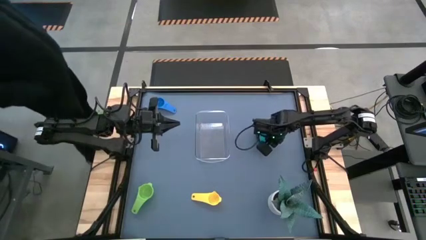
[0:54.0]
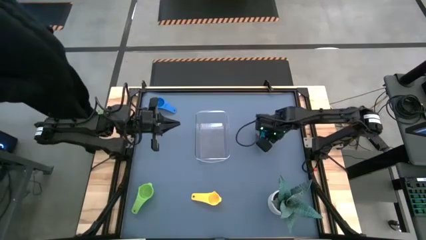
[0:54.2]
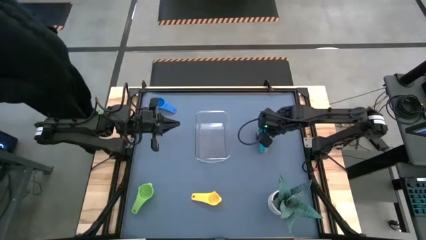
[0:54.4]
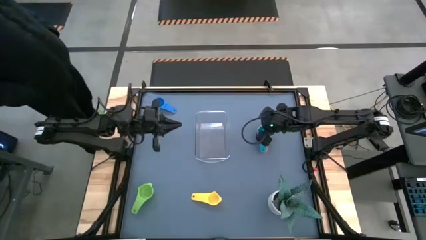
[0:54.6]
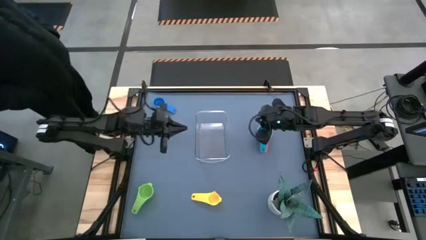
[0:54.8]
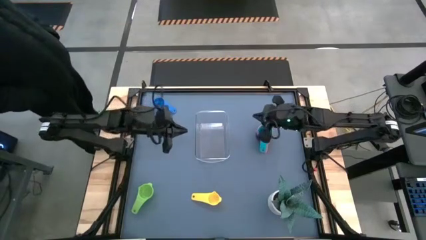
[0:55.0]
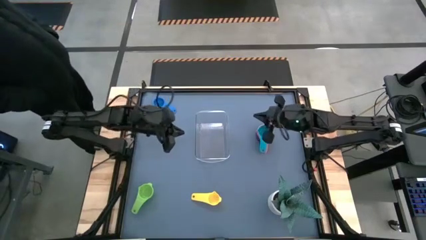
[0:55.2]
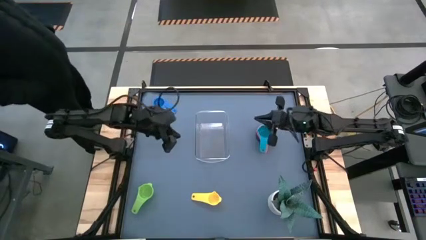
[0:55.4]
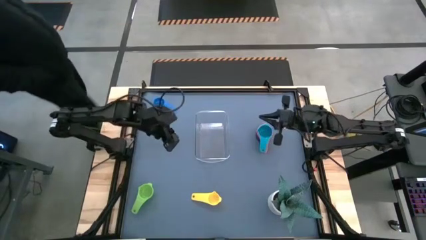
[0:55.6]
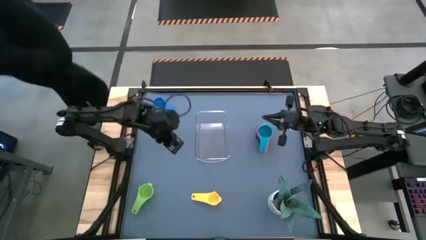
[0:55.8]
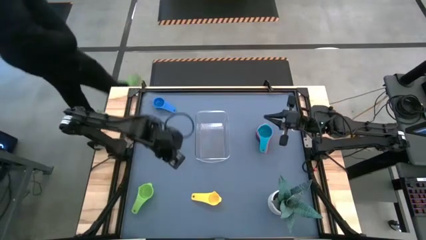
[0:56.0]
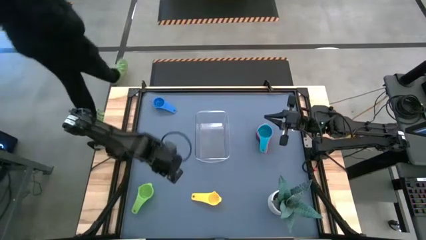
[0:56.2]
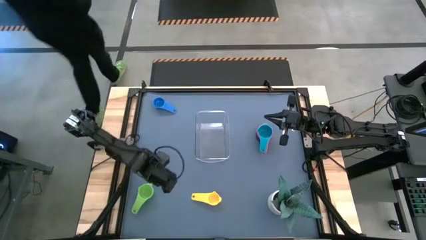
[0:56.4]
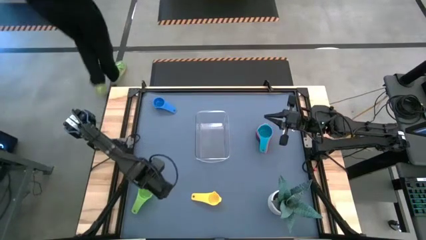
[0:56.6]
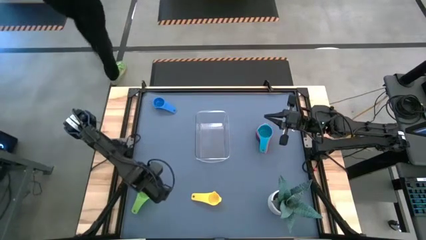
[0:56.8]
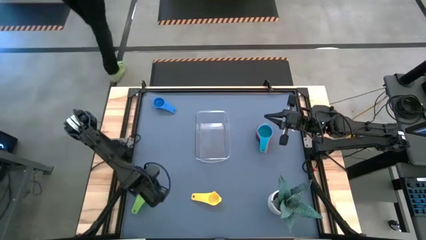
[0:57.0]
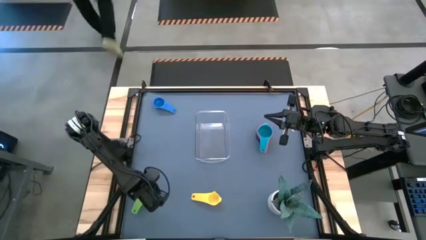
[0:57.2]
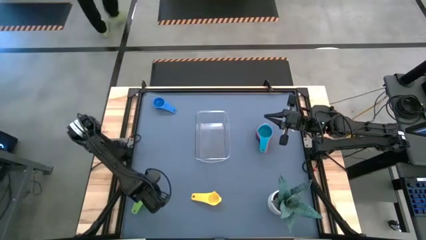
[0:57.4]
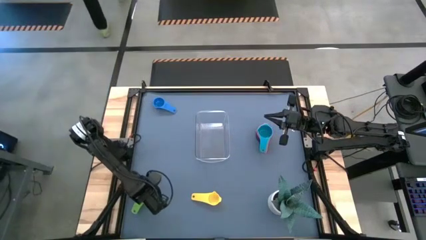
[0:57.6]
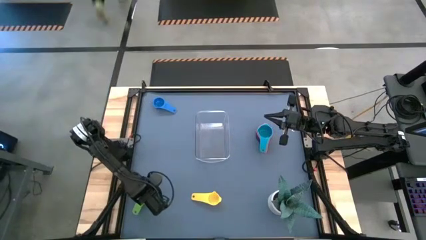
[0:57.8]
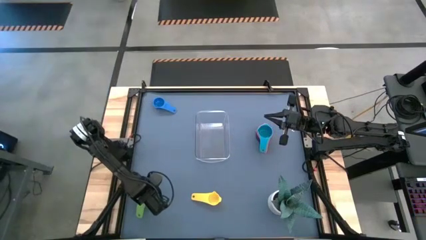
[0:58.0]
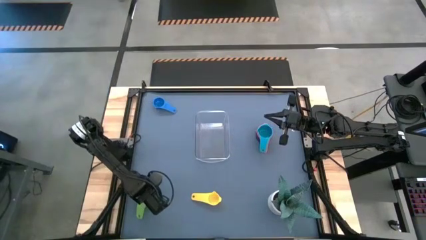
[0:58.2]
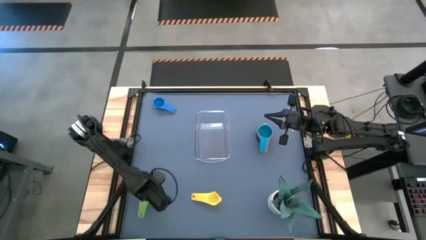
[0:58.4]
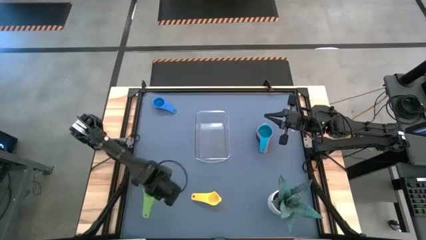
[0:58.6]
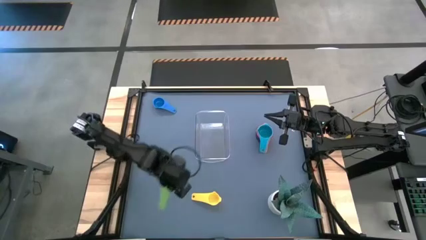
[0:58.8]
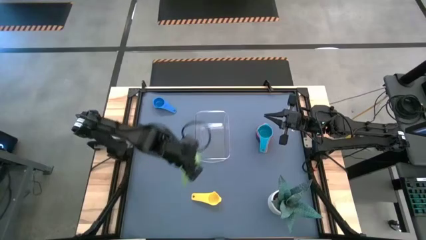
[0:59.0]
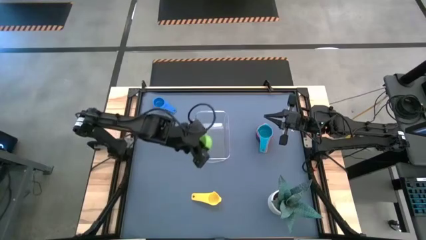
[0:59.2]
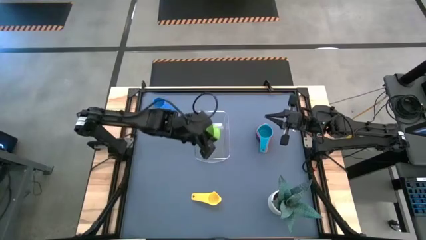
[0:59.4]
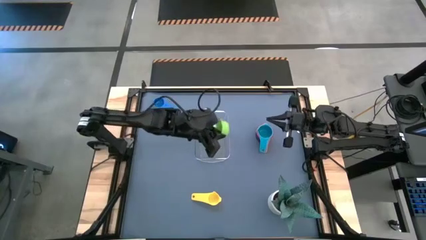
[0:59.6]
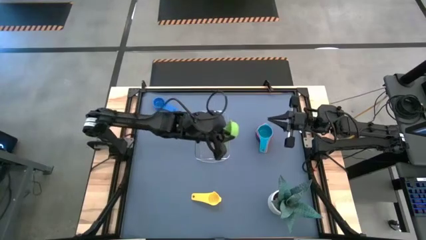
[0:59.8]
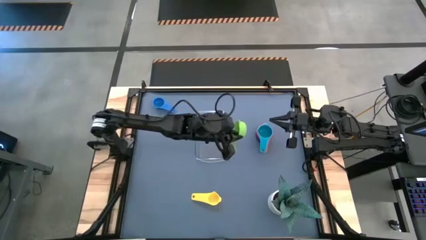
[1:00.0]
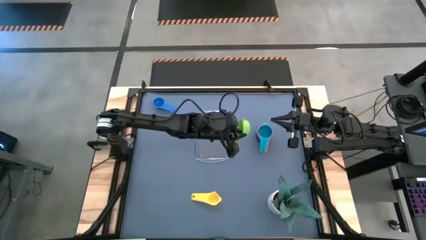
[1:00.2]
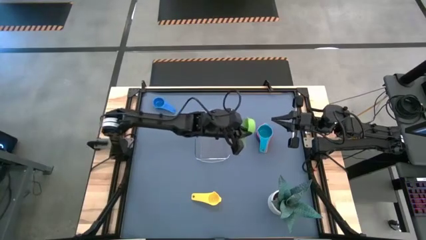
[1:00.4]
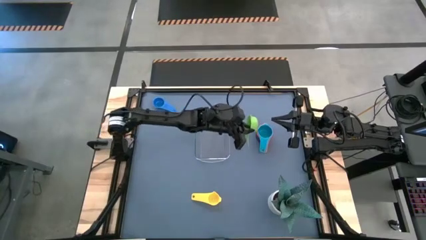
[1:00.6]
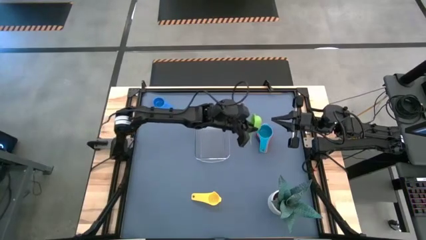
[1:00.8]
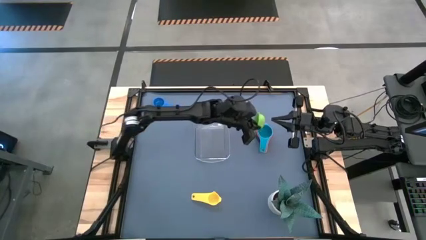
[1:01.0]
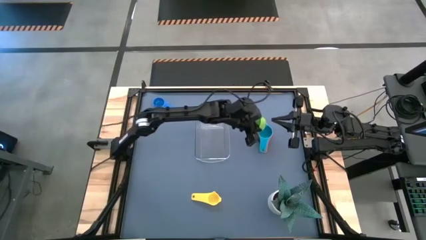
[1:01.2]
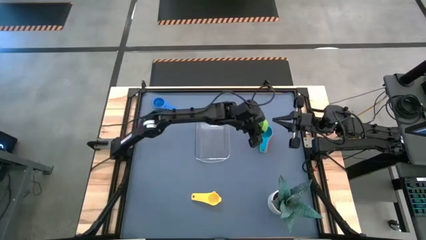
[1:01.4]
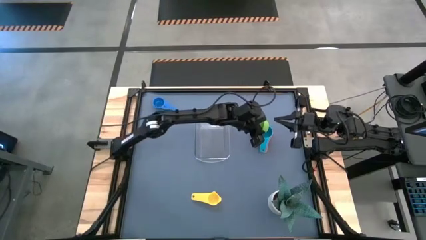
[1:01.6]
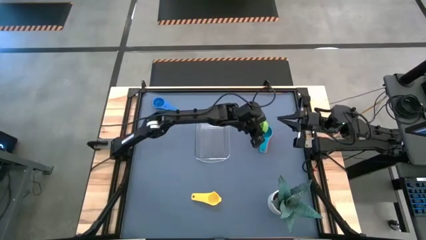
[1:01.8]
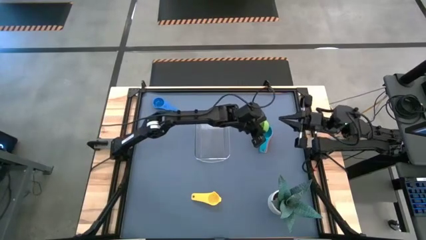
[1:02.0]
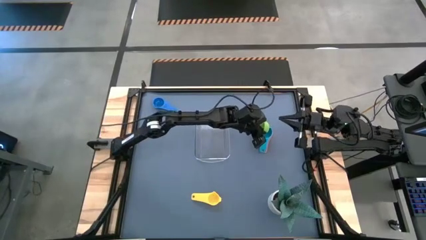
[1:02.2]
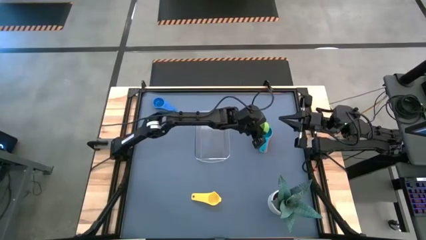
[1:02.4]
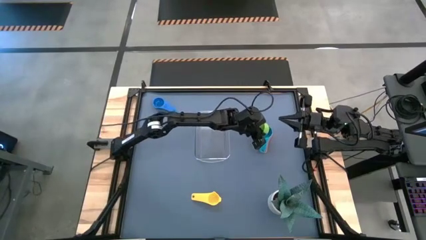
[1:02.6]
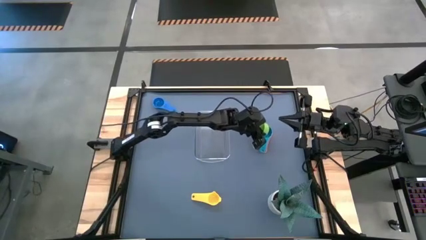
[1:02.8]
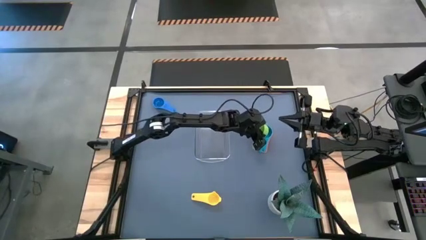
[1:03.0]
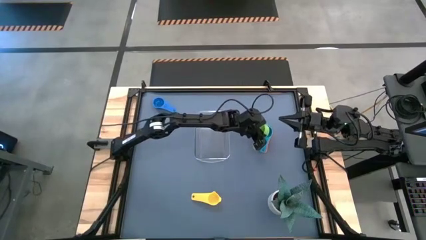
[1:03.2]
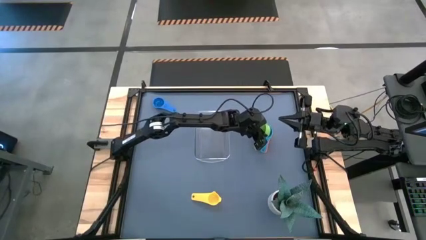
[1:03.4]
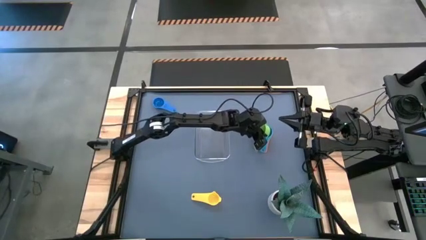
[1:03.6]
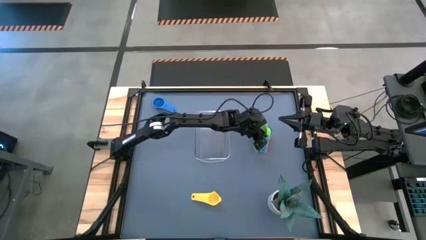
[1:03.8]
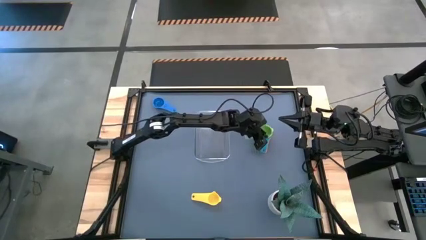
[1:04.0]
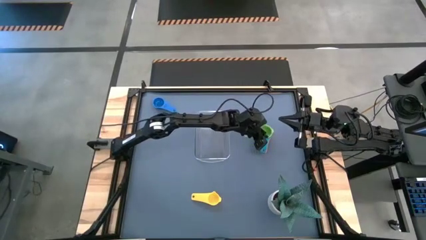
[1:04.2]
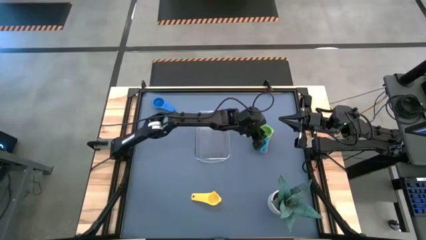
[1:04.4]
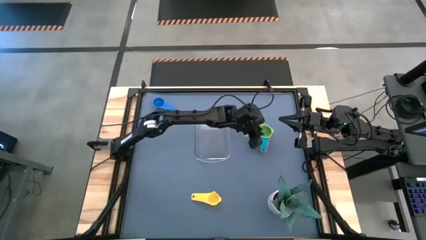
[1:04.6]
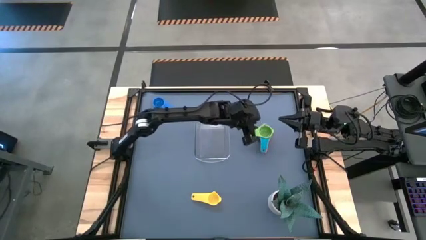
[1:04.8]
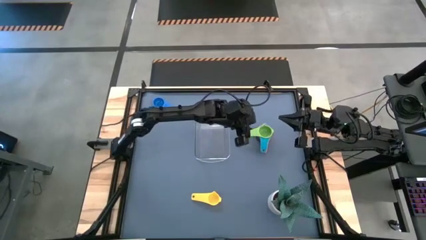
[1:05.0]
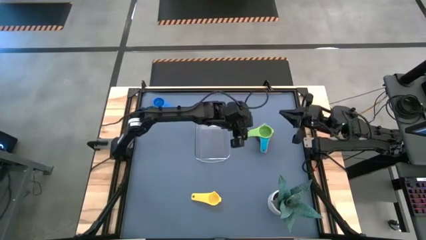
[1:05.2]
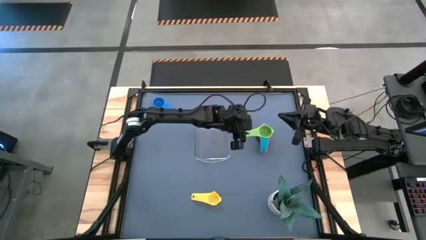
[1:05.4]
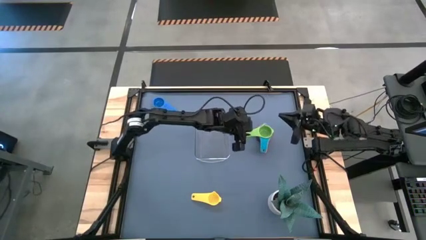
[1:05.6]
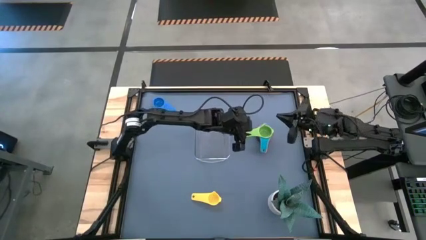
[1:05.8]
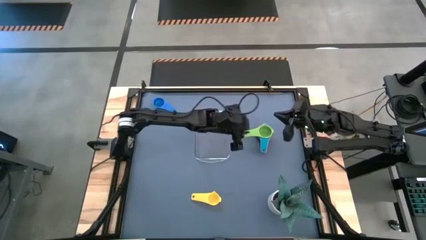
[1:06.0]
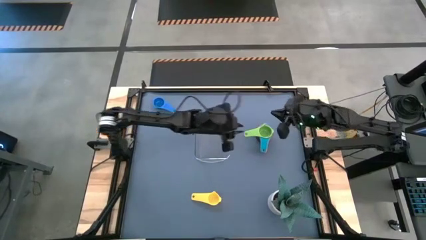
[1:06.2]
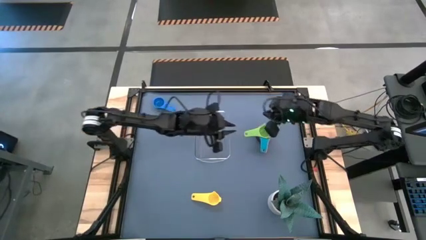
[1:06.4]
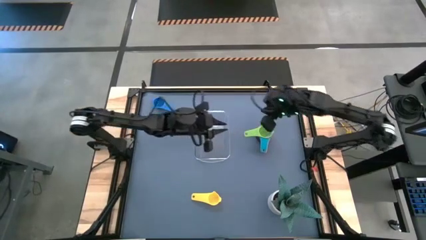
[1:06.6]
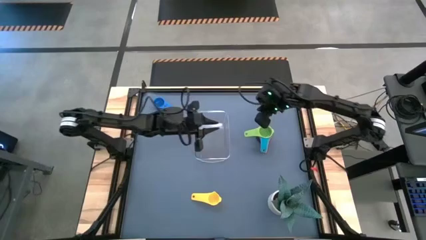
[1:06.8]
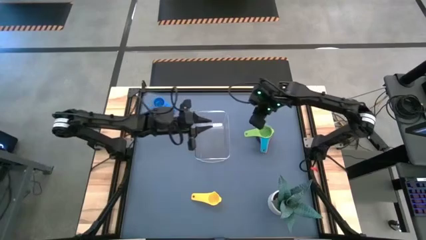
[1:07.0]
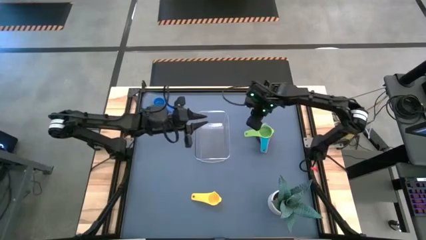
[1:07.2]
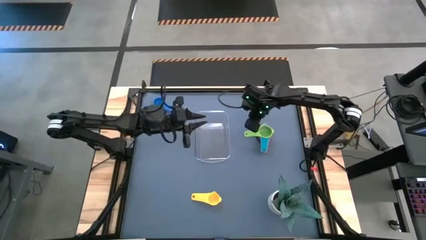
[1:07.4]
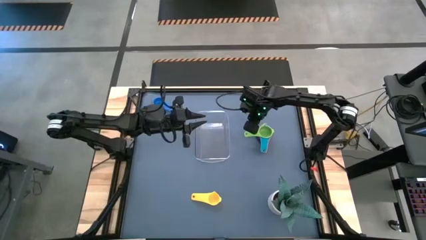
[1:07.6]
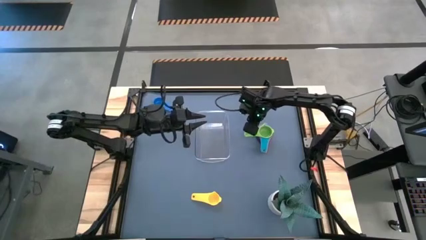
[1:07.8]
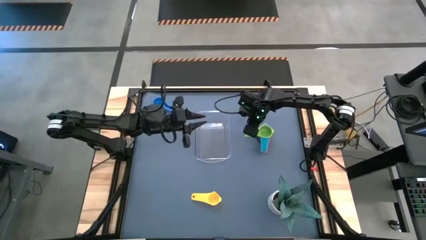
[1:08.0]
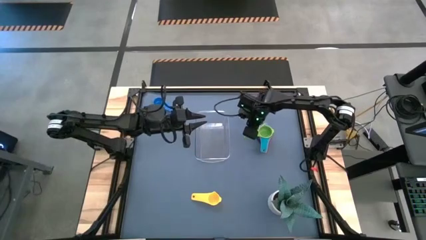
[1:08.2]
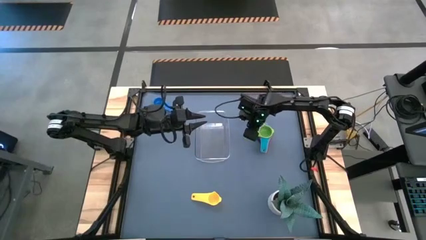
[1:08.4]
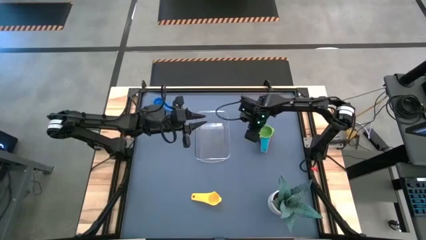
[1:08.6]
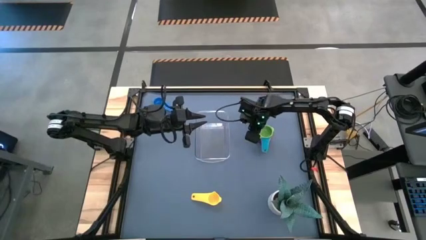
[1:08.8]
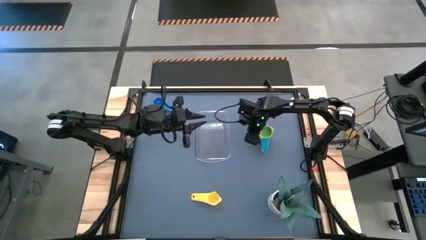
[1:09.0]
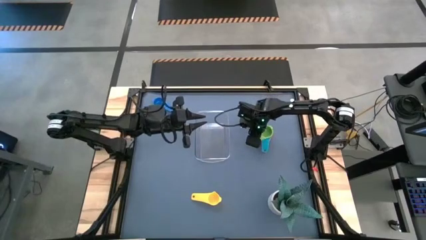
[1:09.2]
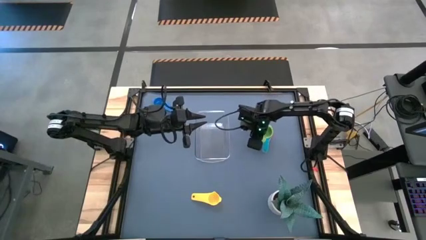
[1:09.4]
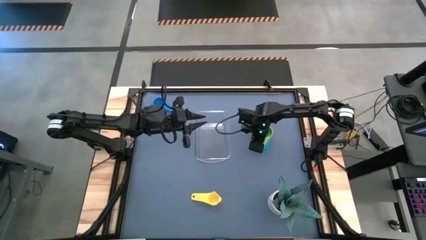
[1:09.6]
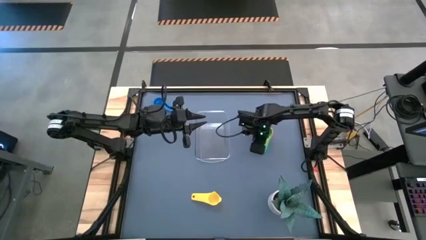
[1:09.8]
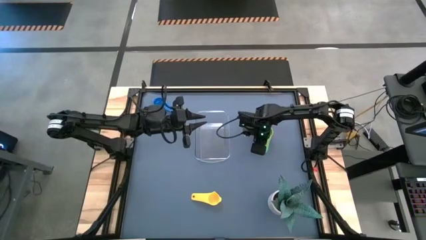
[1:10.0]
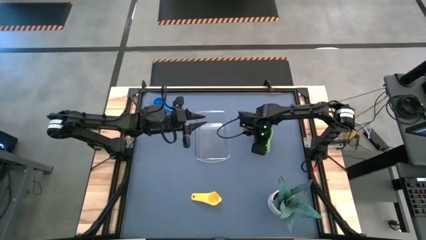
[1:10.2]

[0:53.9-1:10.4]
Task: Nest measuring cups in basket
Stack the green measuring cup on top of the light blue measuring cup
